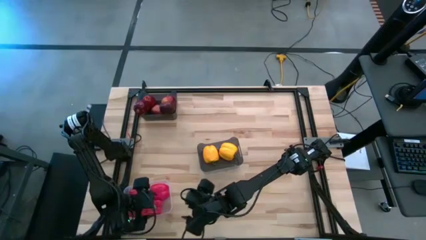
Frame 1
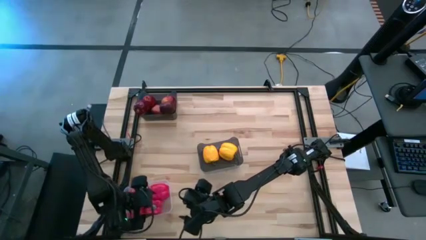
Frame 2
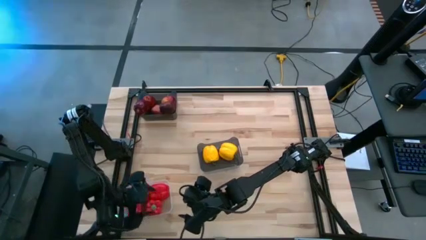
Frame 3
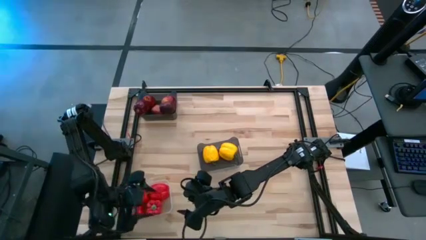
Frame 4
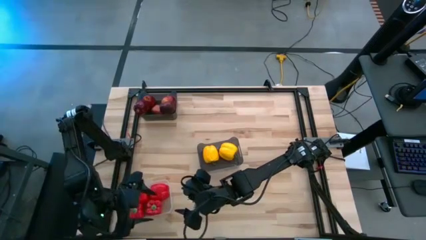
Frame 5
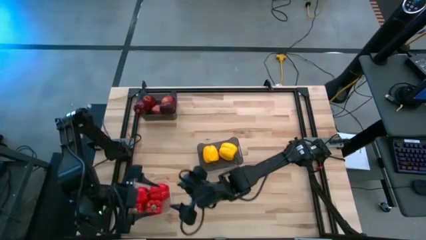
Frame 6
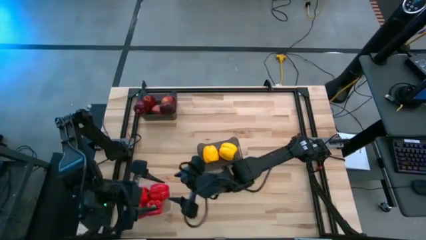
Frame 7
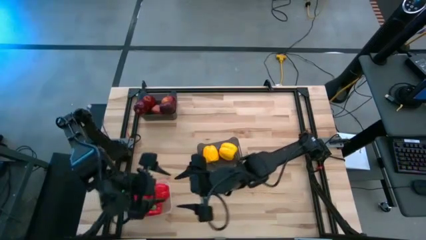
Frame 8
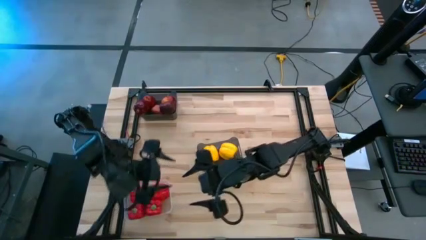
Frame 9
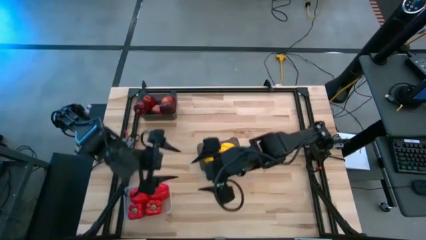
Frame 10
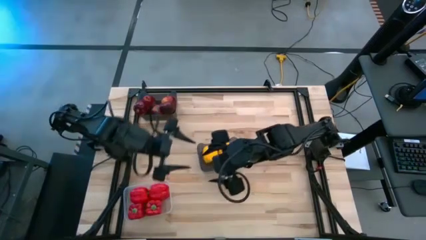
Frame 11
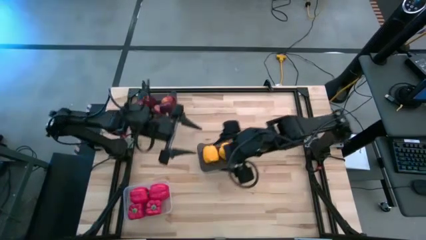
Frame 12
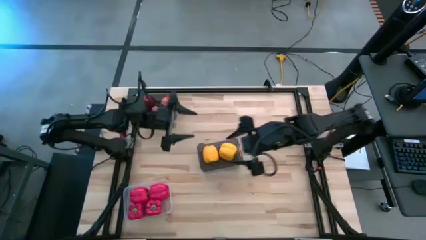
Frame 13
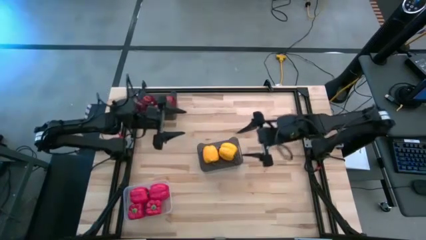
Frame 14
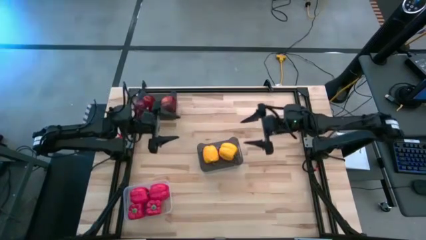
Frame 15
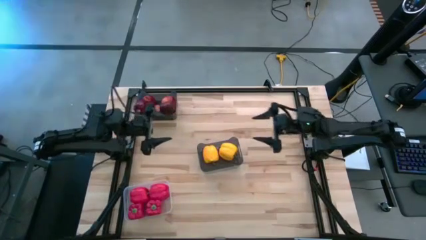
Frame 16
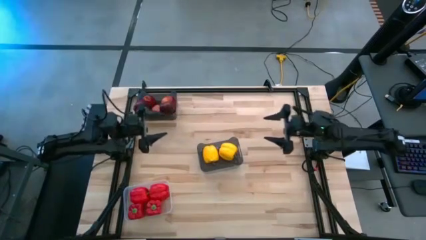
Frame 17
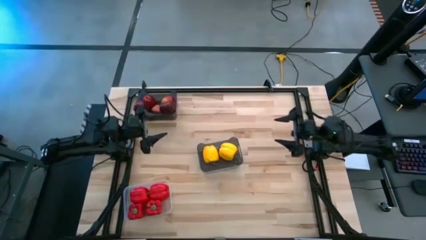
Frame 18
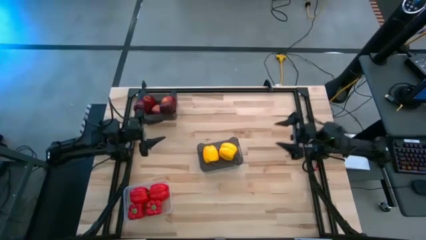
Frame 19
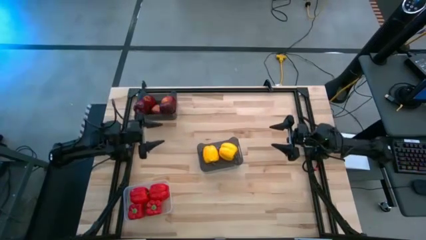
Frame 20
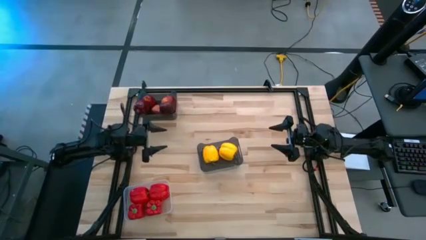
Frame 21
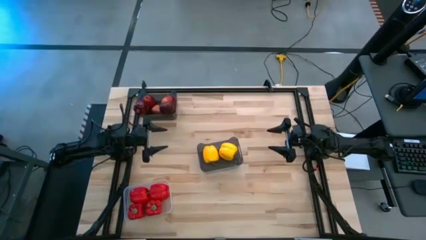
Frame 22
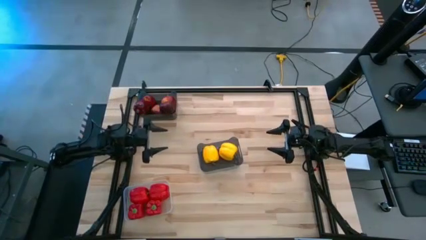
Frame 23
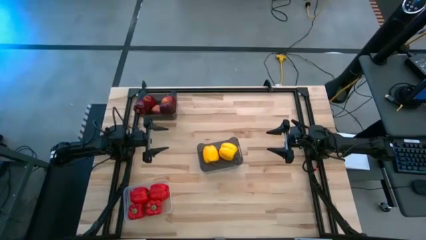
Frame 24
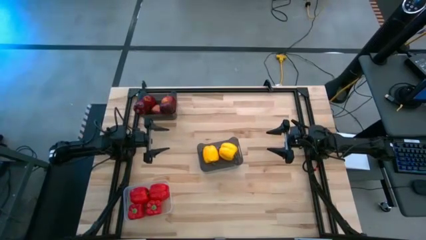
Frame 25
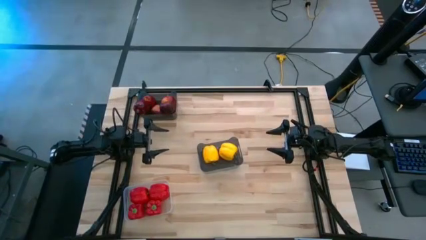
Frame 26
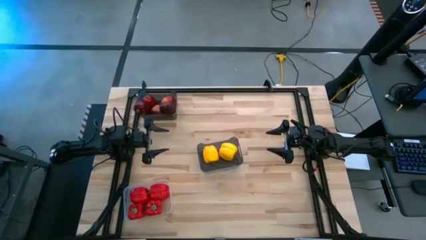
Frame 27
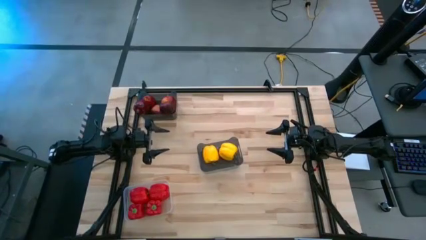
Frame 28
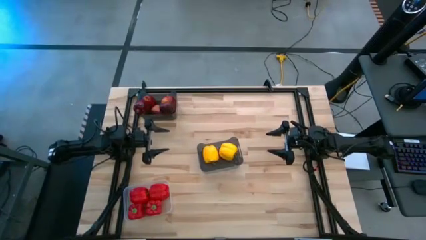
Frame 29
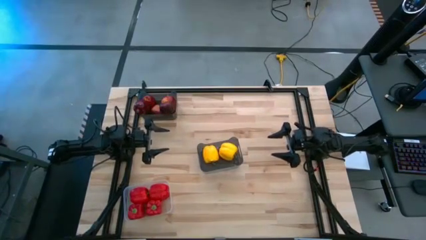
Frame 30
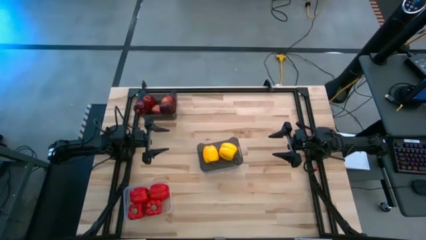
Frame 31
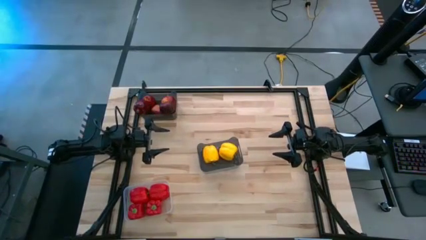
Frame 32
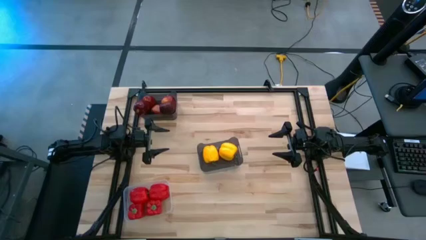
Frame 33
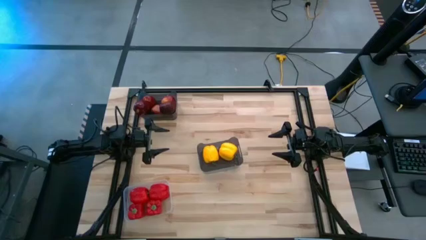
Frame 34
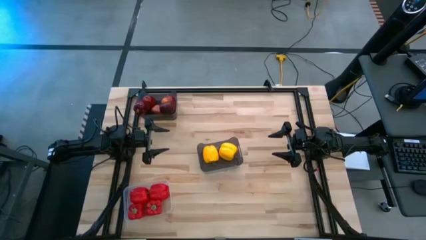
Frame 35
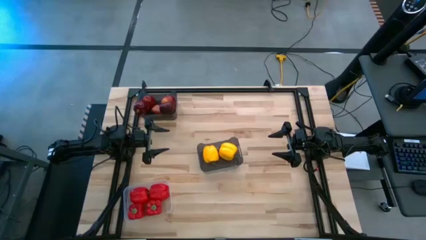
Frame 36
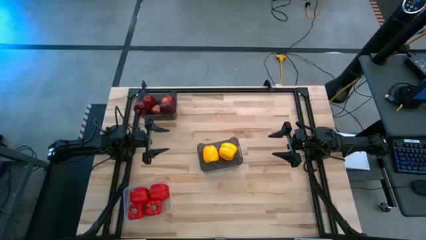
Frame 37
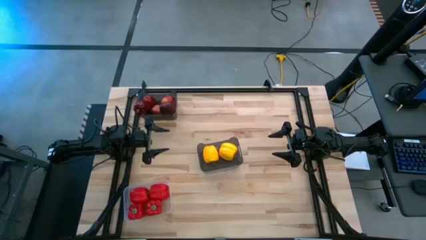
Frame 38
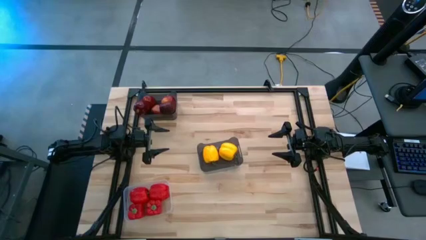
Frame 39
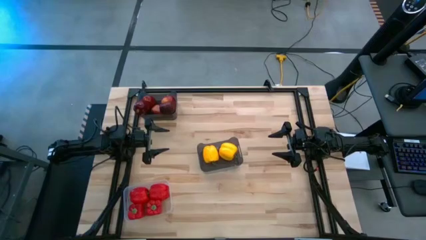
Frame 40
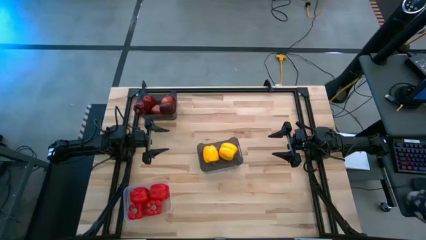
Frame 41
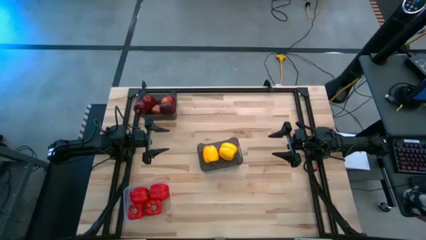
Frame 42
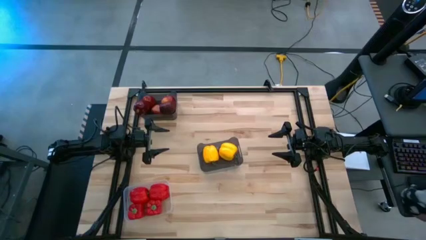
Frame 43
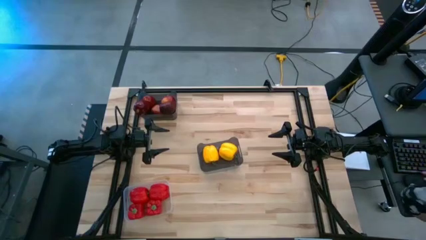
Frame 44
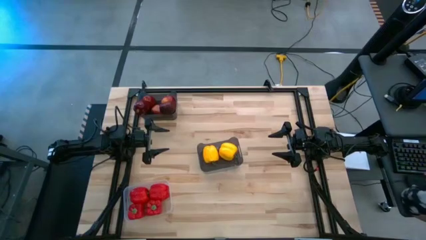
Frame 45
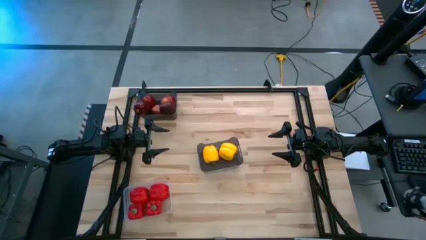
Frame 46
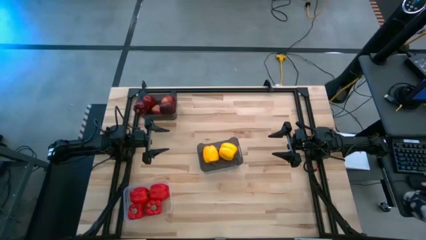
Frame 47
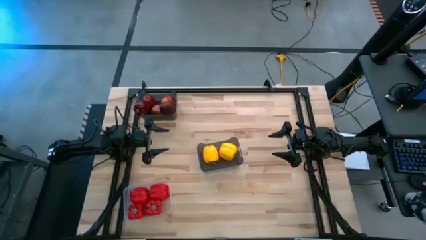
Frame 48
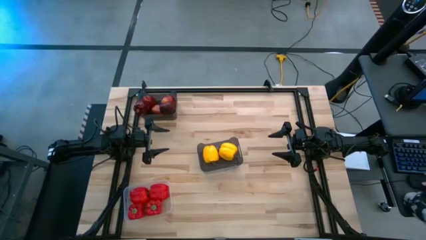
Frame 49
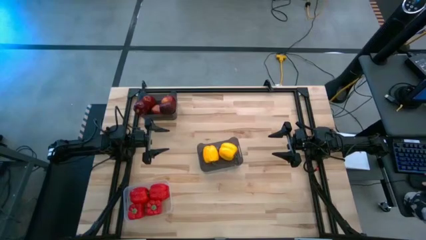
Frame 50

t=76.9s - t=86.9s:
Task: Sort produce into baskets
Return to Home Position

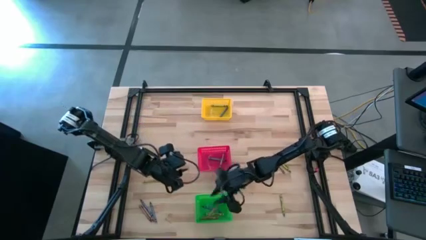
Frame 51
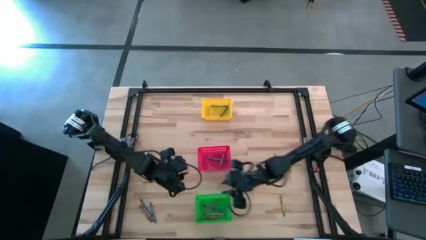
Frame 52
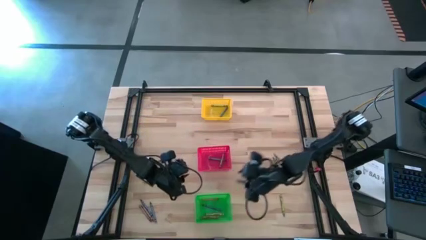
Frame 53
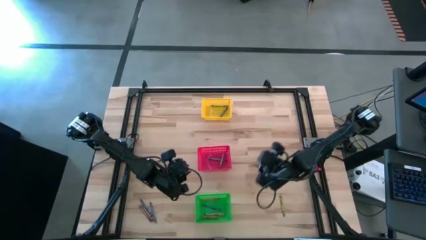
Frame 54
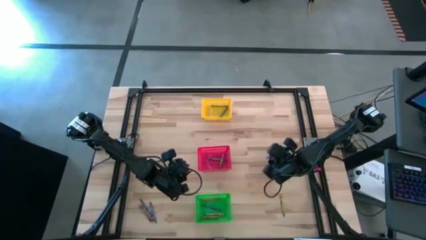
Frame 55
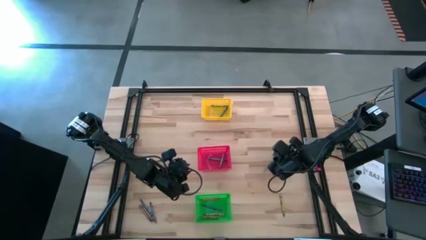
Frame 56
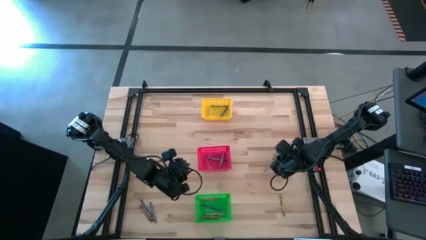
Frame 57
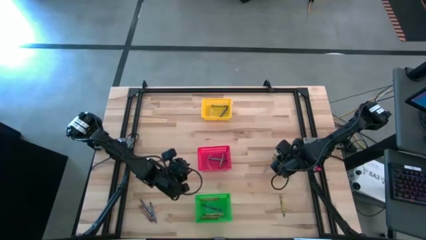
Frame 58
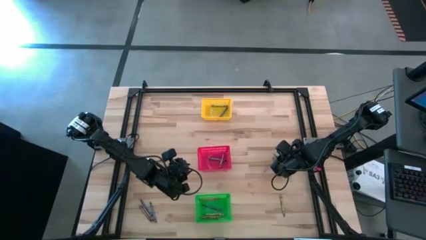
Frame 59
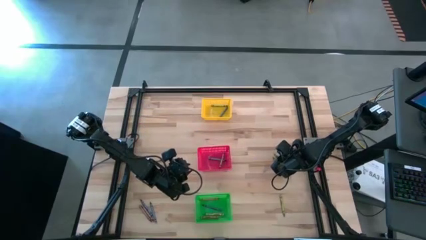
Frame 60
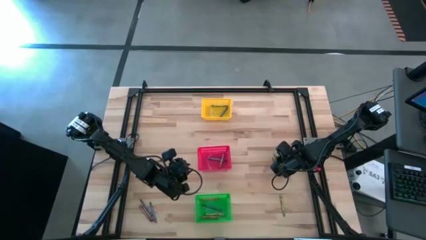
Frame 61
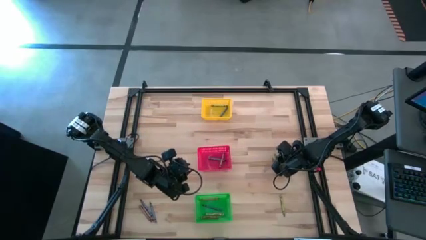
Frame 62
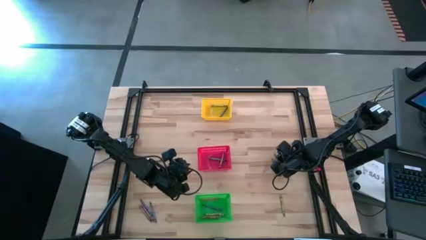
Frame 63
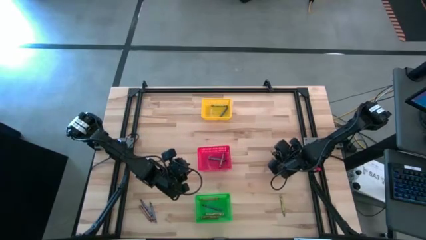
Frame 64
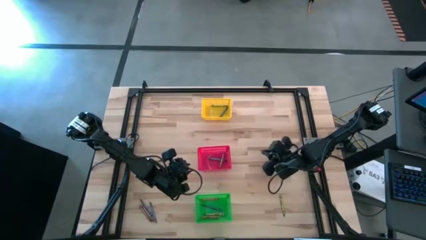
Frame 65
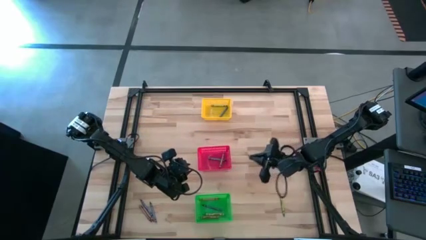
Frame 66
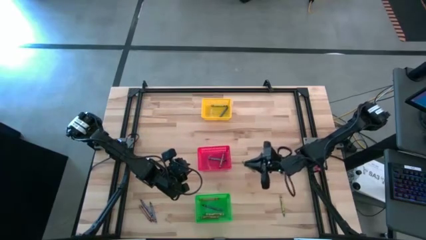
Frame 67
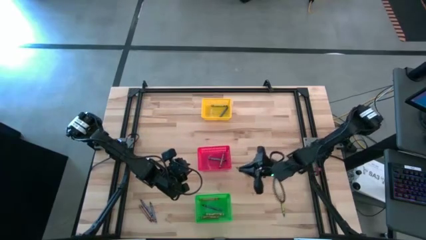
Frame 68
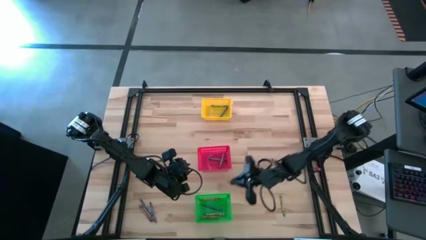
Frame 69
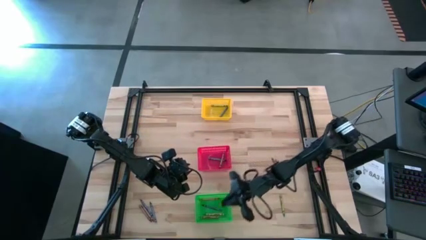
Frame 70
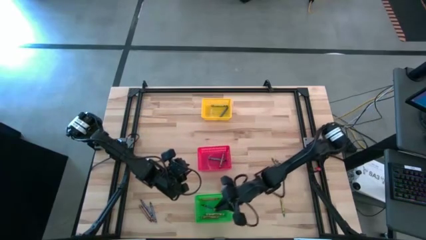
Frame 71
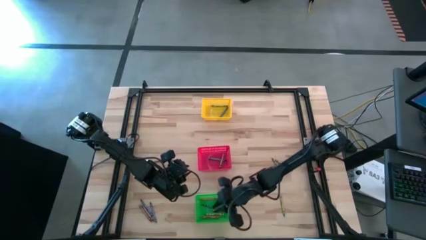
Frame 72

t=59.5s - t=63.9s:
Task: Sort crayons
Put the green crayon into the green bin

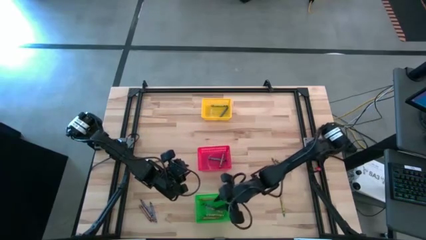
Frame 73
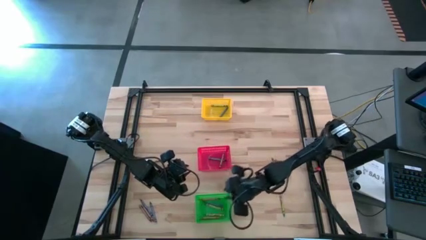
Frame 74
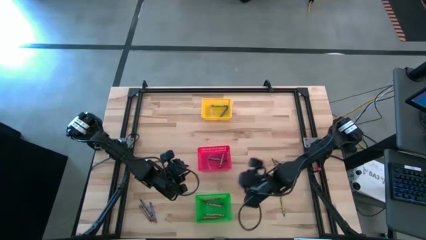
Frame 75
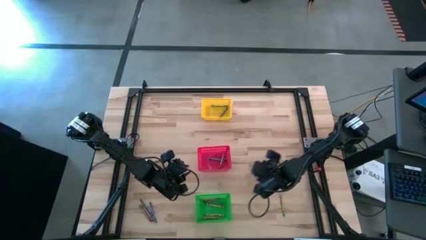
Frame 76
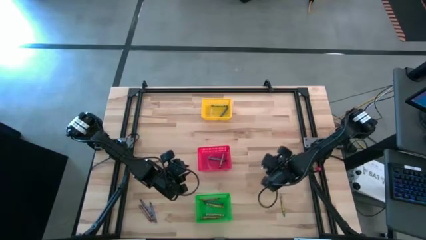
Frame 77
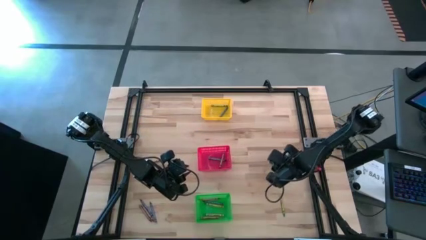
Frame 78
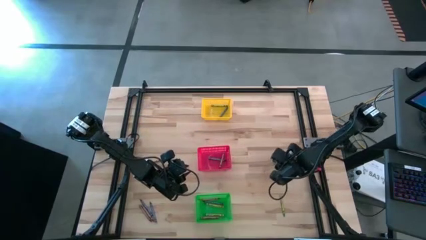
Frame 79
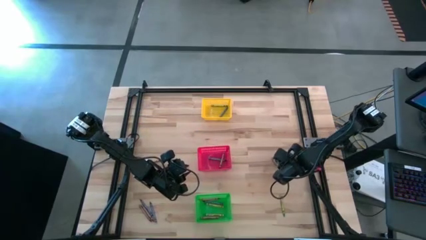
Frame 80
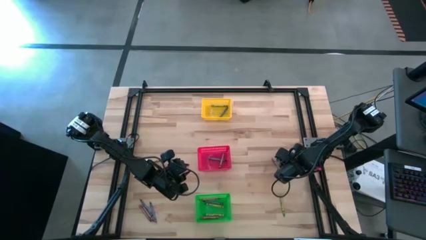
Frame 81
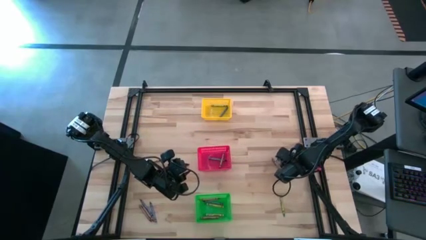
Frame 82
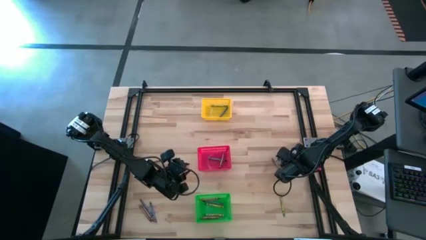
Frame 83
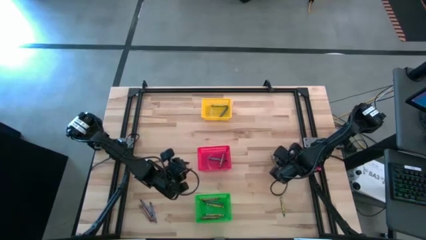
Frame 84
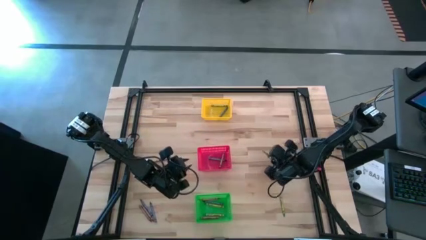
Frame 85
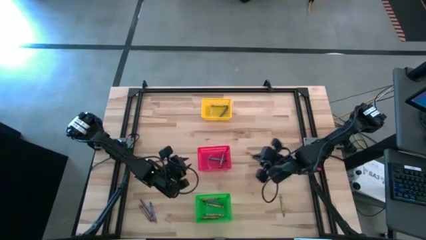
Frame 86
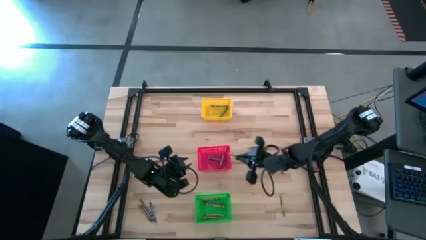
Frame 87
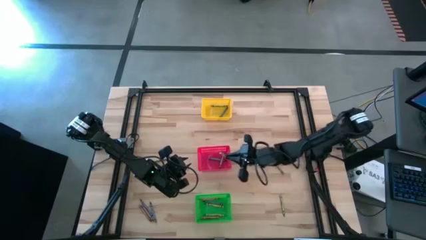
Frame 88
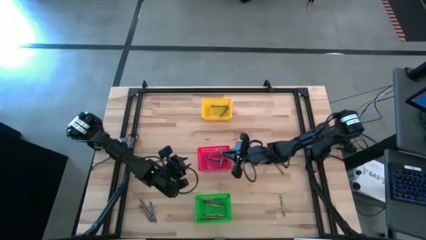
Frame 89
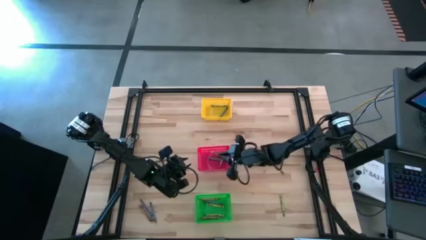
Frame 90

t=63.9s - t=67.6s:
Put the green crayon into the red bin
